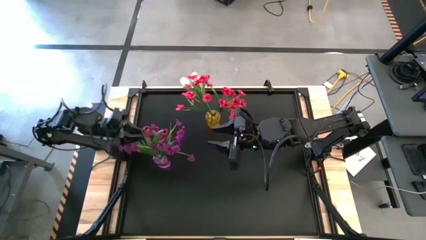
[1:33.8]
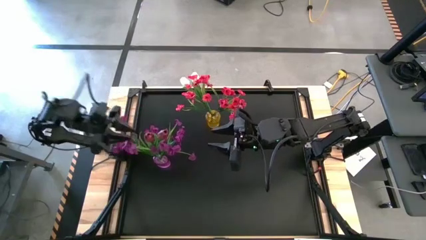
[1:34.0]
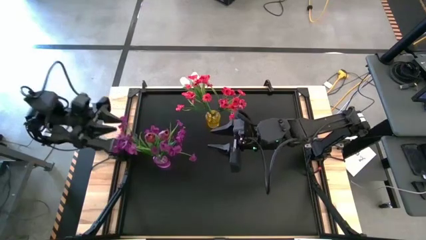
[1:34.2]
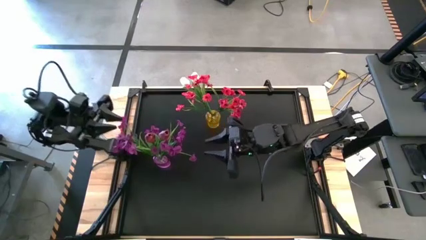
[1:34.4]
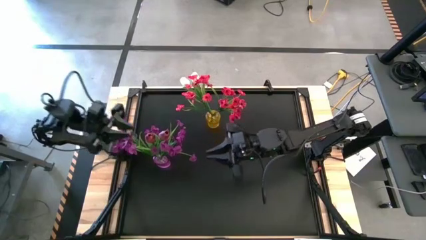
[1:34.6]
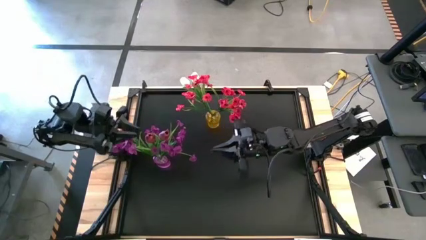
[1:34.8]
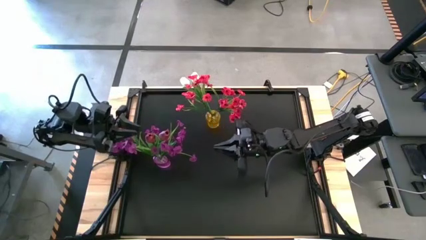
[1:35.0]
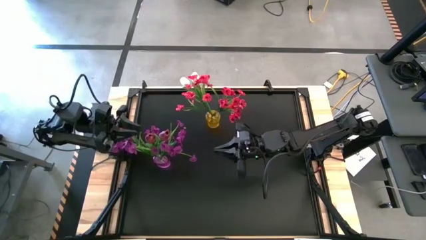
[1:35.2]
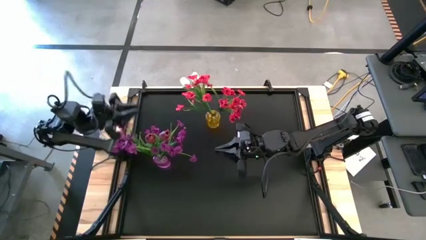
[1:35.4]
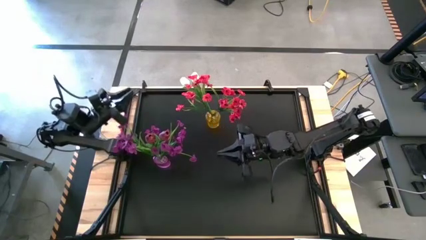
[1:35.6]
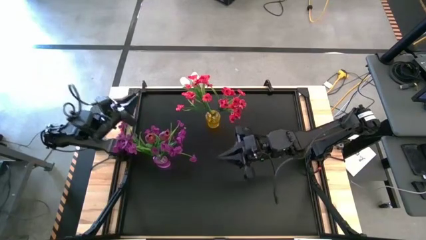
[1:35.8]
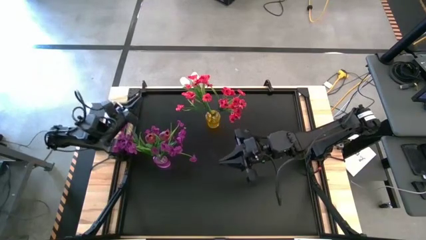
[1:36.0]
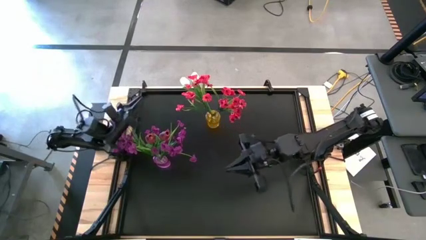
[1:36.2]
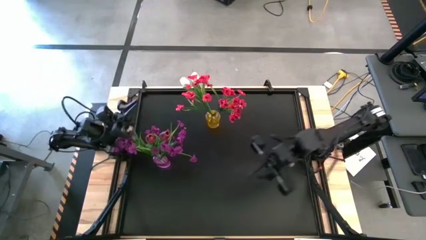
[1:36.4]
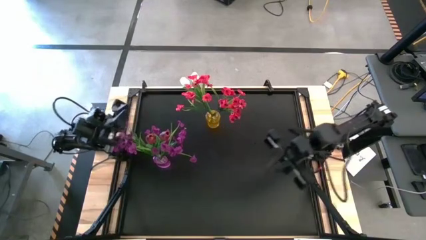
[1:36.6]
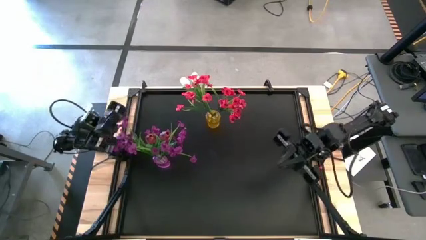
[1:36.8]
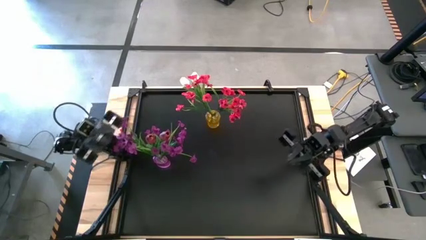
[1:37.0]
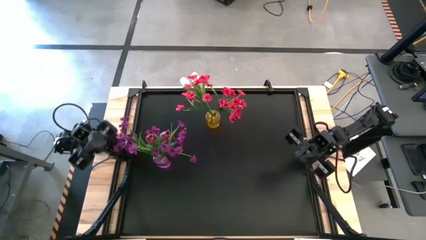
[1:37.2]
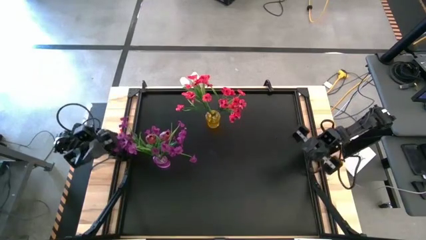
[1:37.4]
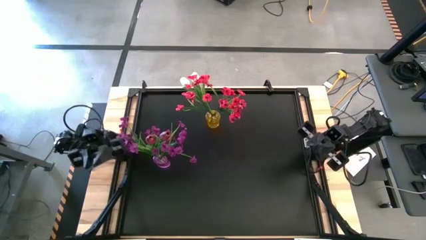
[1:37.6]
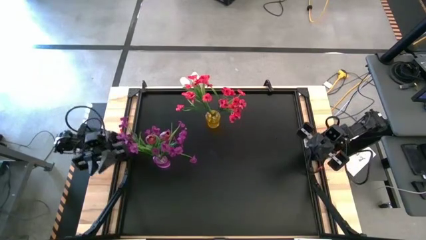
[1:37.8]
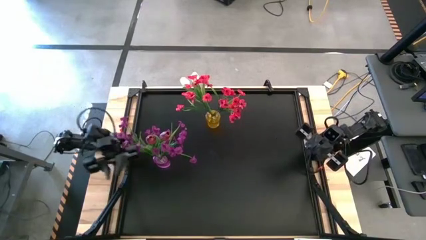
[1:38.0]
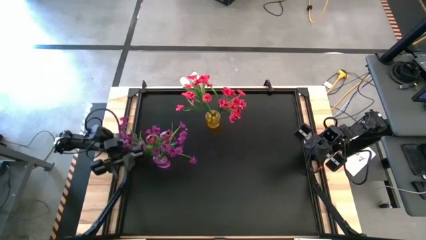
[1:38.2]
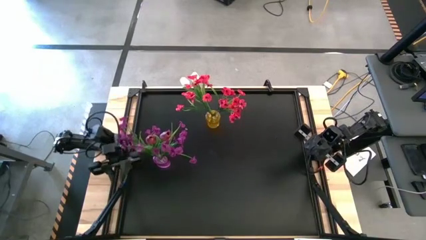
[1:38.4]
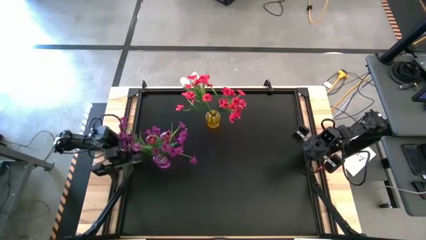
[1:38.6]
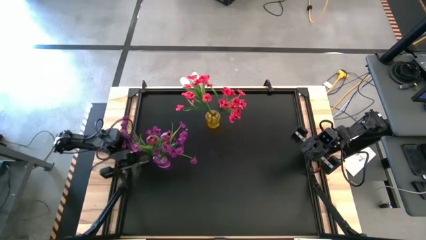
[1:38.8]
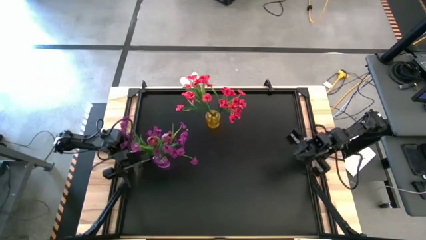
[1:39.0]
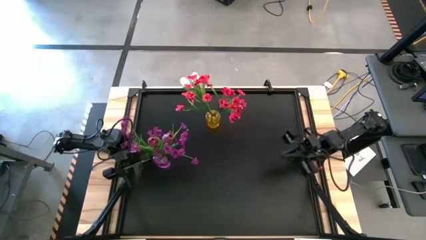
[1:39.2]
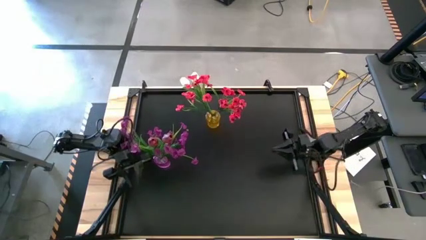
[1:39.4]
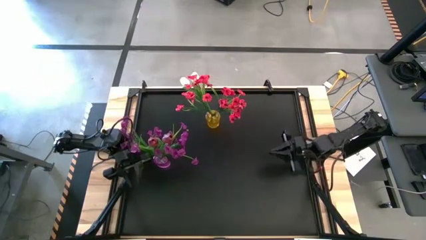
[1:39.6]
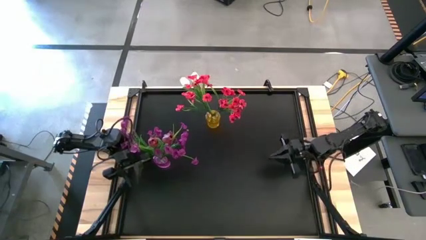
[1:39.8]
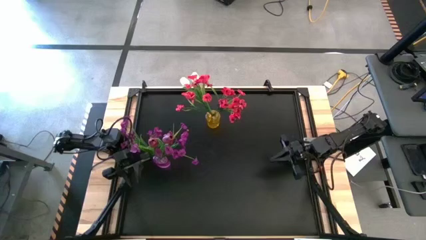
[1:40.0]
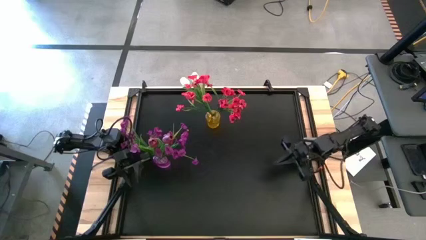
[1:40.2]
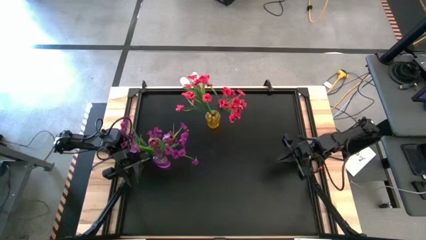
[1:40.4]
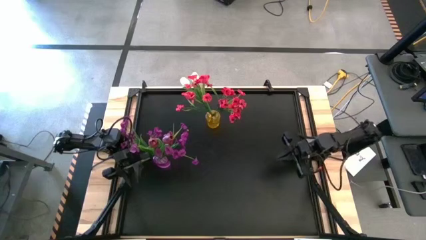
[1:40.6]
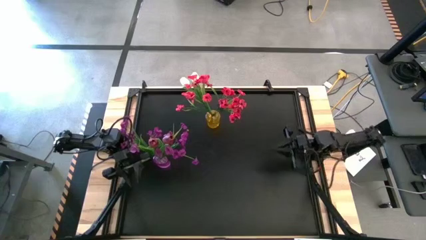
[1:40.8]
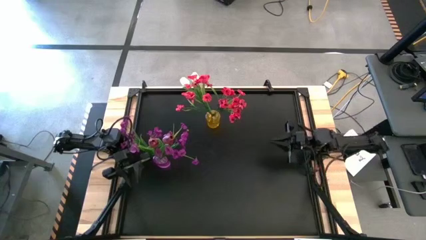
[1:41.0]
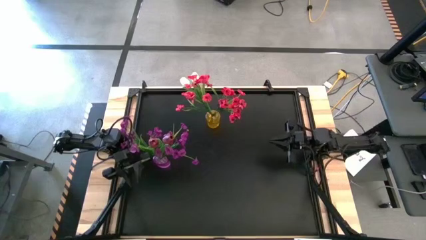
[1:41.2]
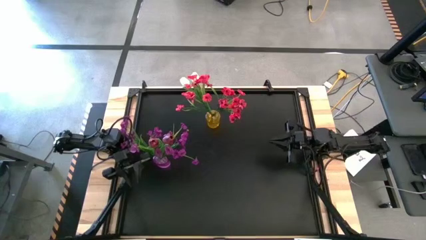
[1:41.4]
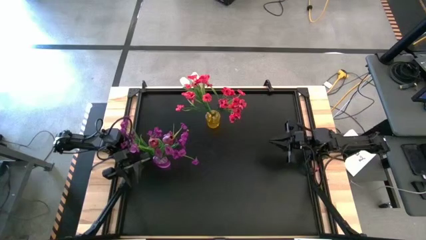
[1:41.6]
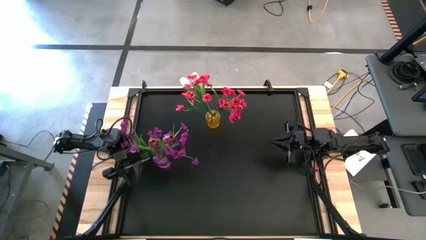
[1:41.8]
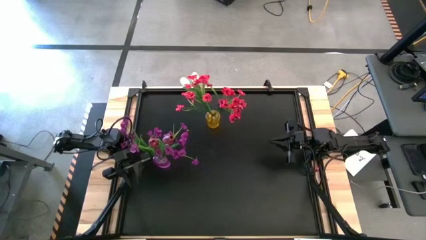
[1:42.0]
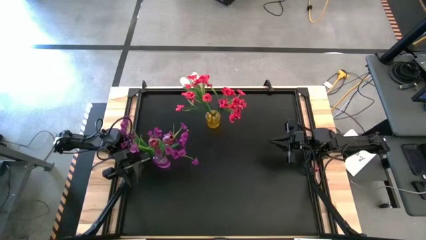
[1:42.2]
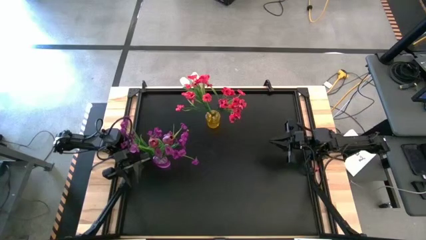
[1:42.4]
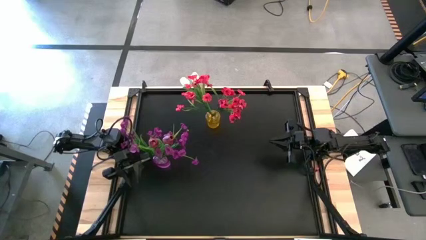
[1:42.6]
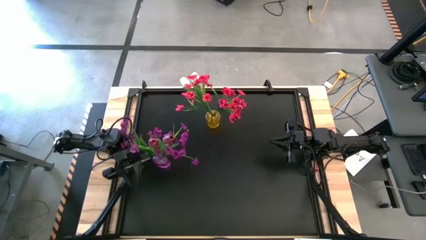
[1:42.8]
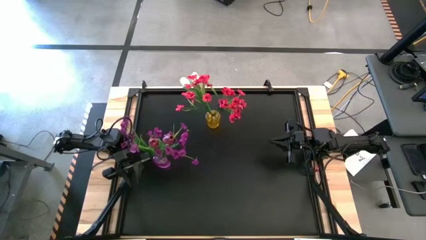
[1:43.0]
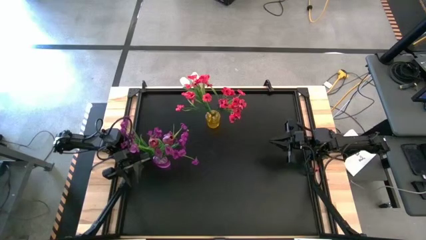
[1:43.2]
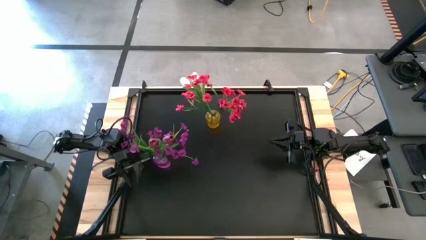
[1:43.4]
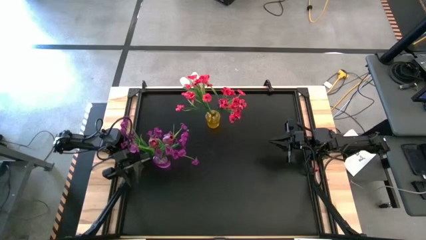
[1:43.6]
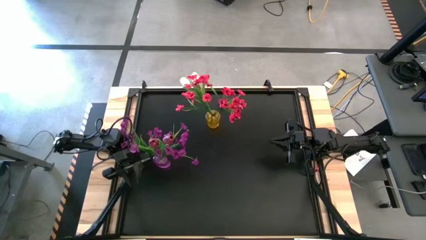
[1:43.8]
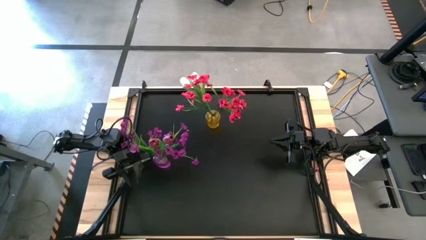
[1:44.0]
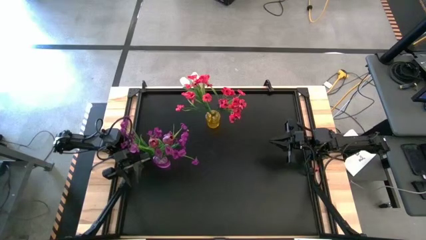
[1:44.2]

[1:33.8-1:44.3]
Task: Sort flowers into vase by color
Return to Home Position
